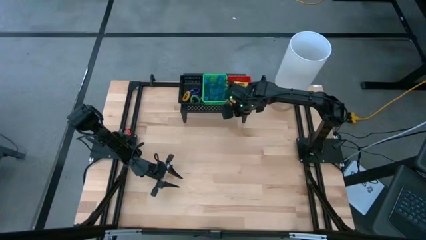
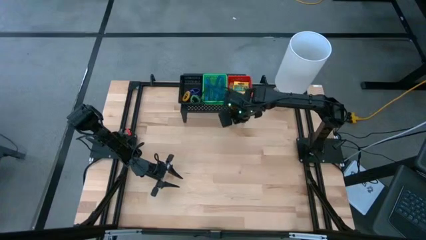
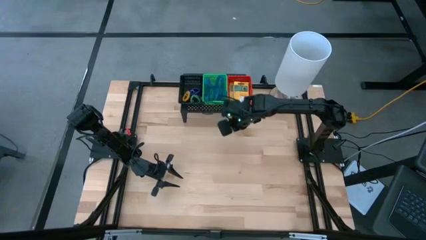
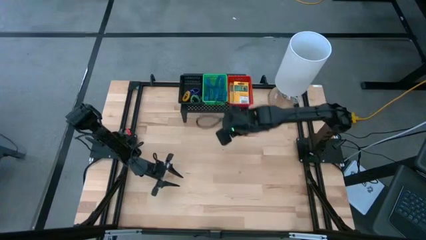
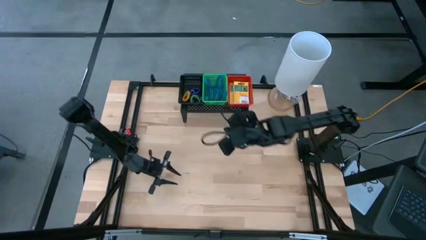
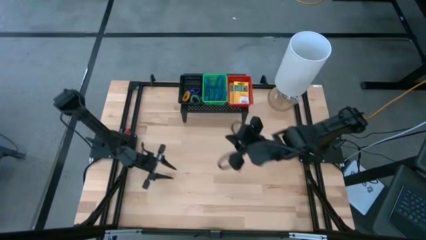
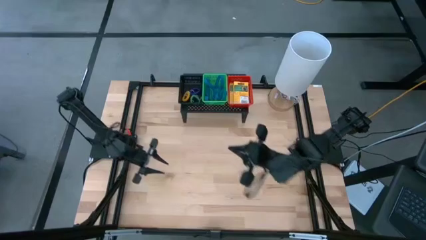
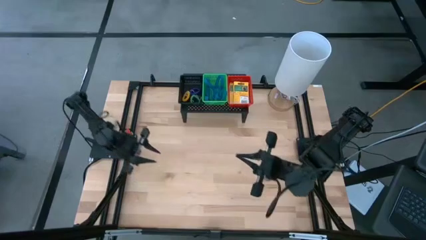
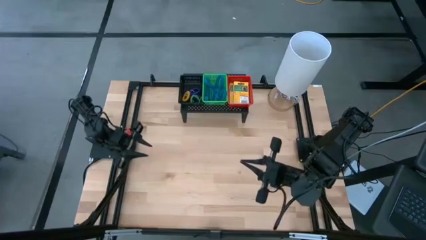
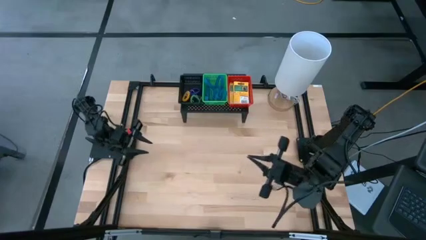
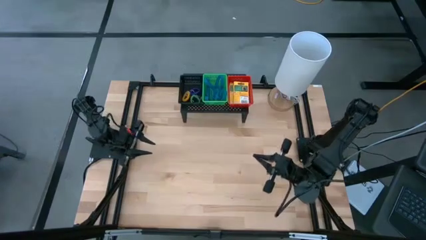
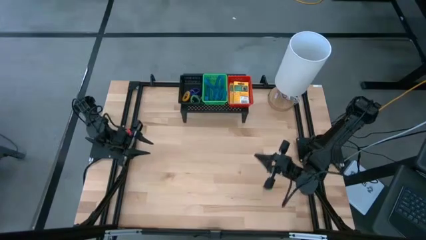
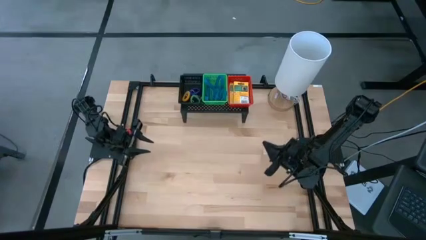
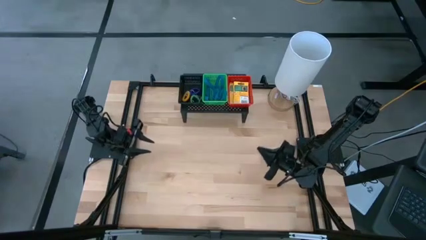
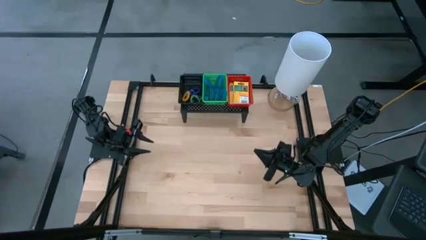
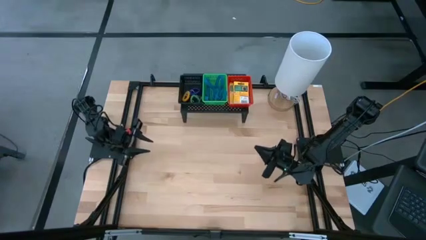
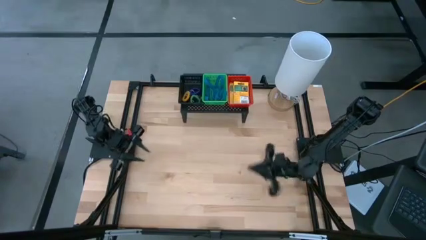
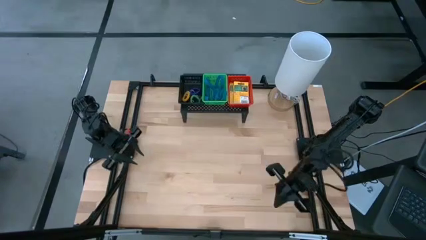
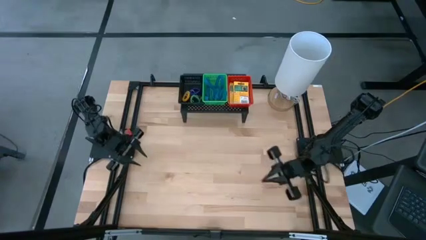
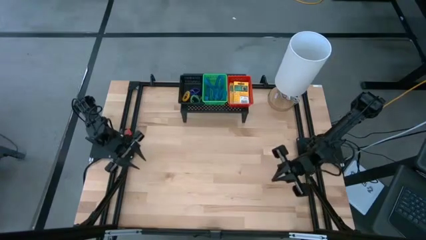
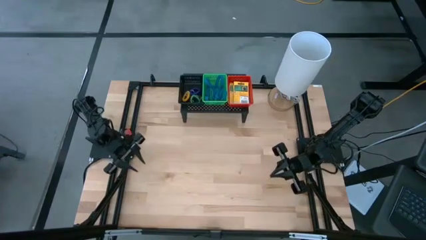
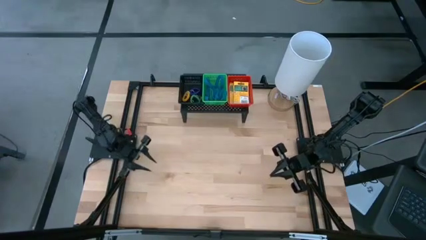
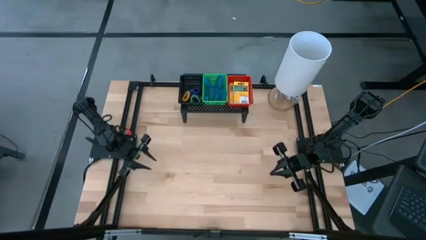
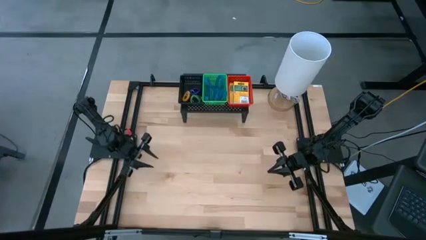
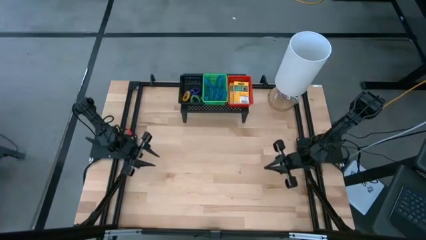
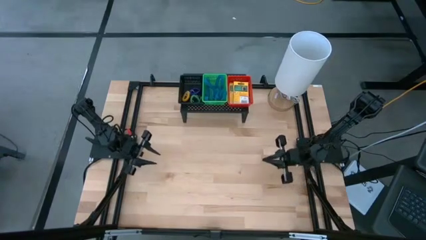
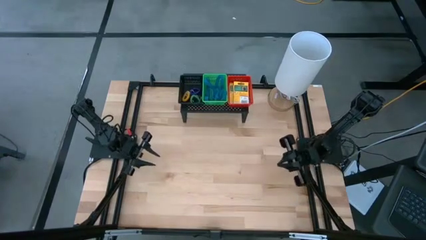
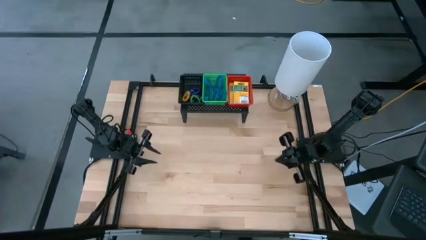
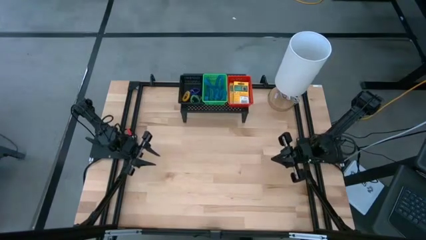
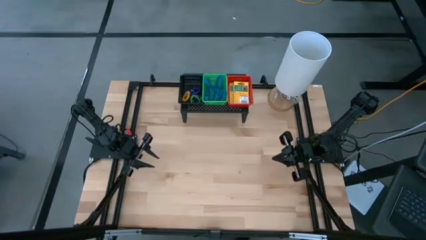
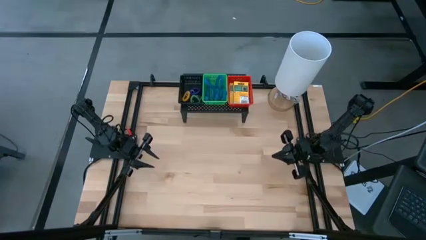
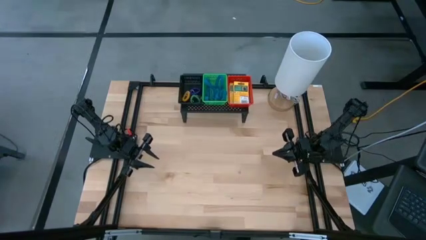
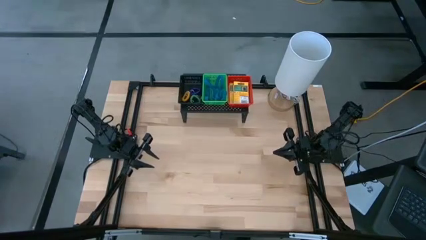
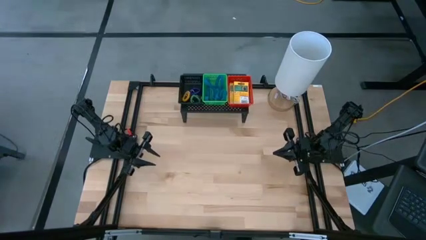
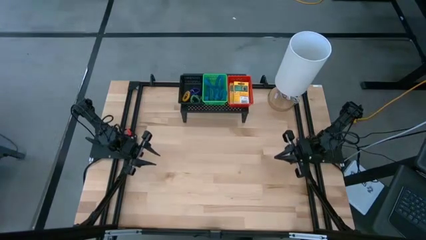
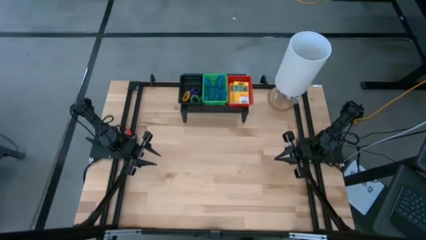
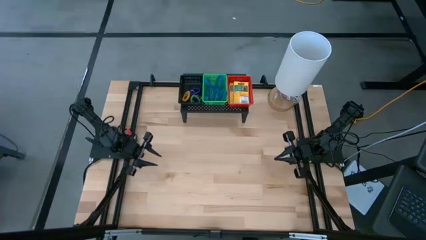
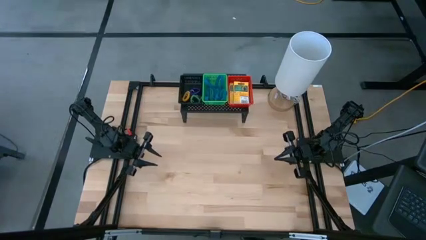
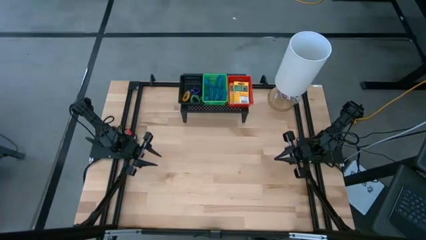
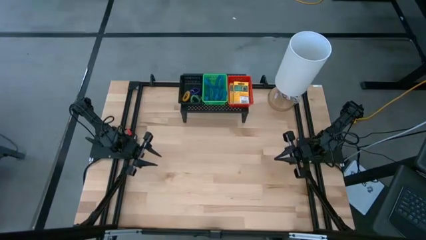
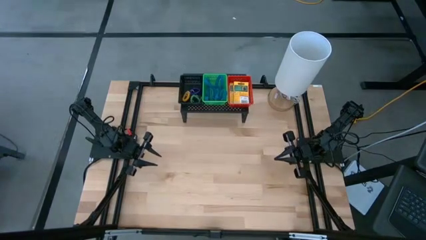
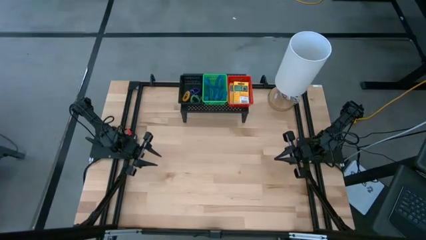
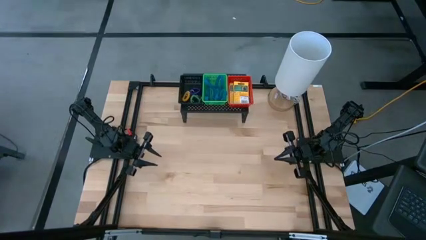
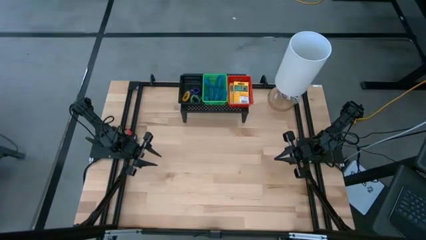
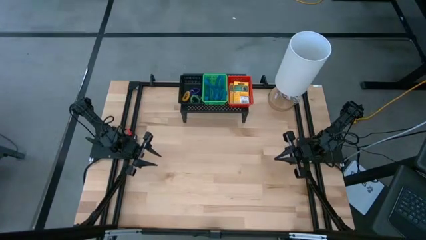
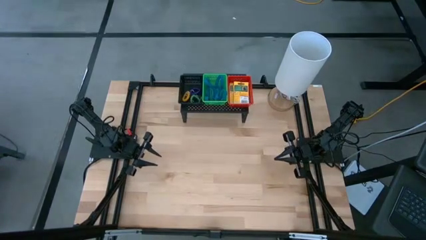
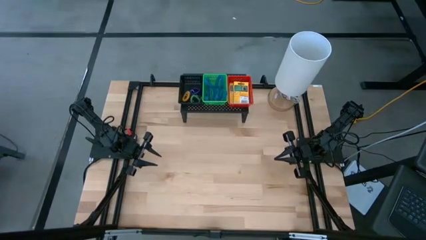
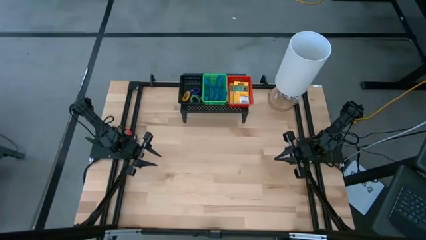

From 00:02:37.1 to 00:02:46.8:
Task: Pick & Place Office Desk Supplies
Return to Home Position

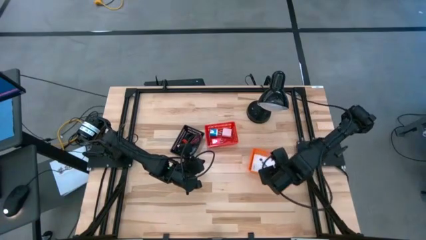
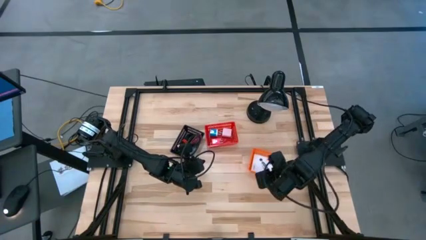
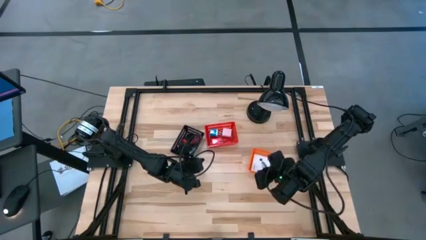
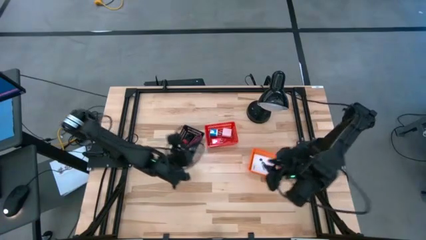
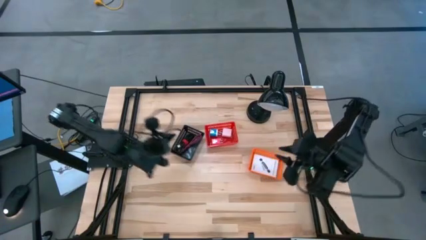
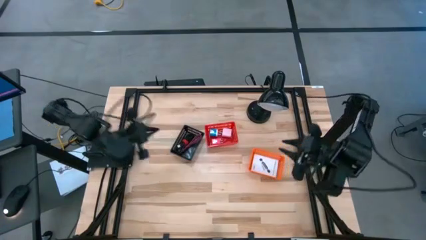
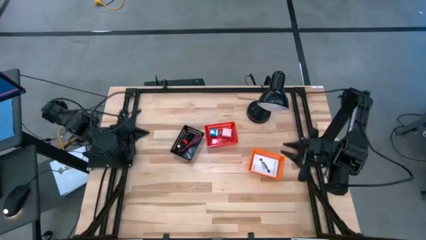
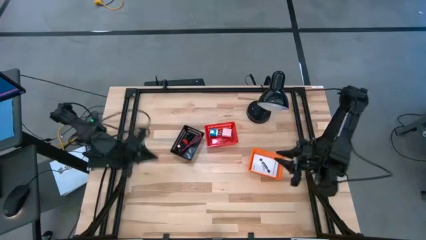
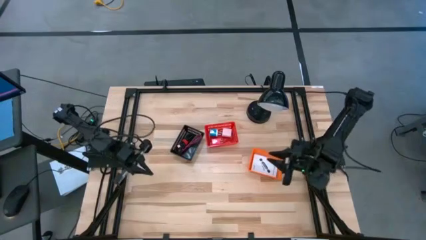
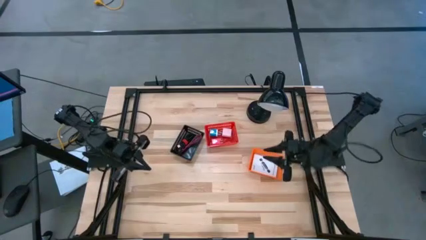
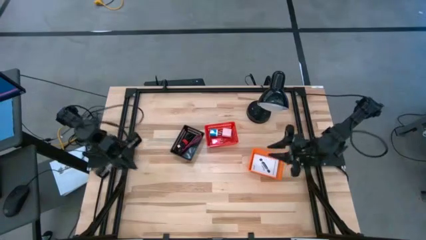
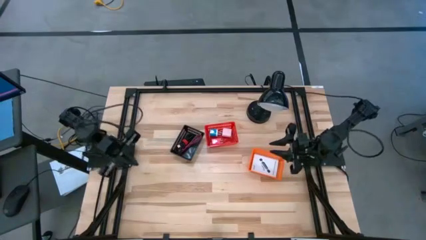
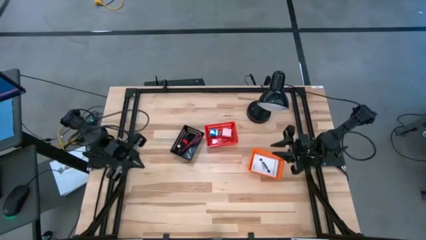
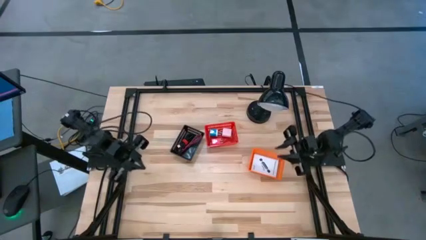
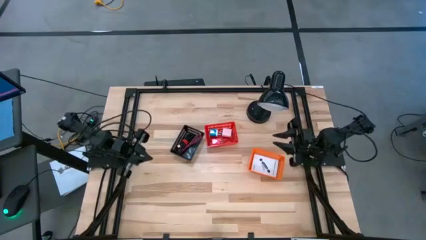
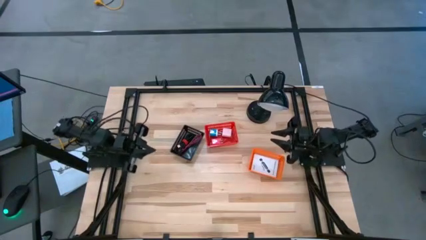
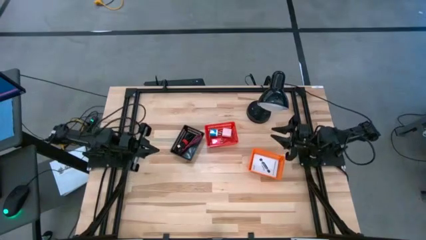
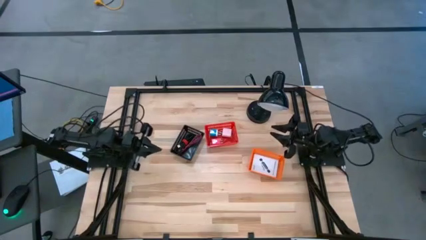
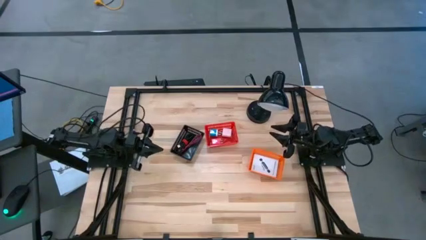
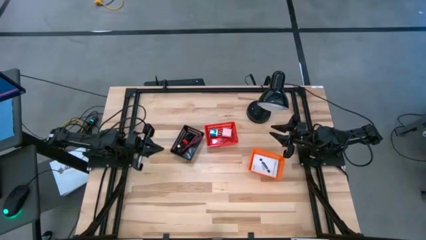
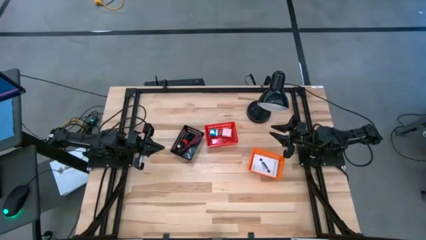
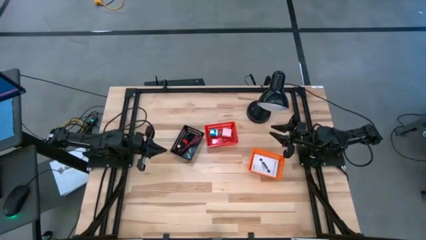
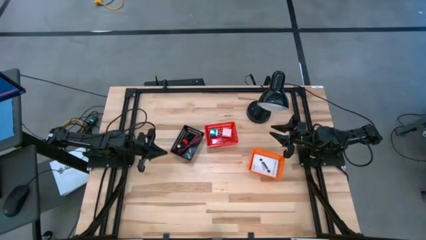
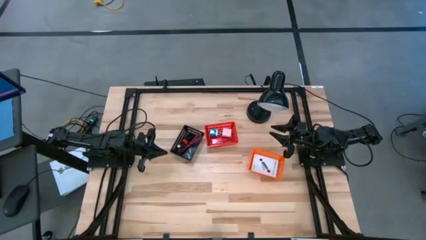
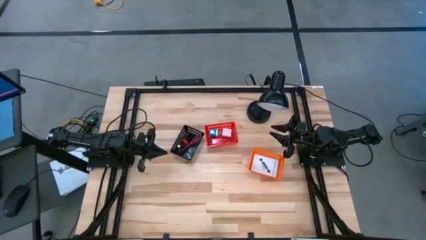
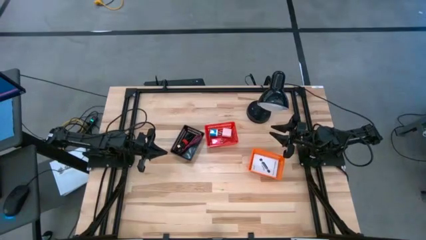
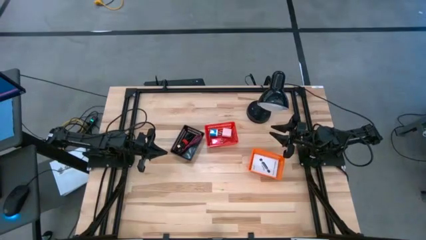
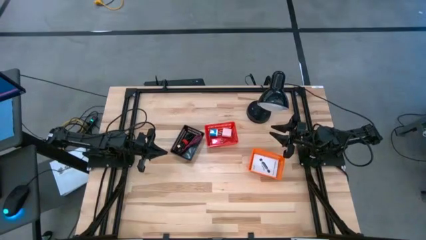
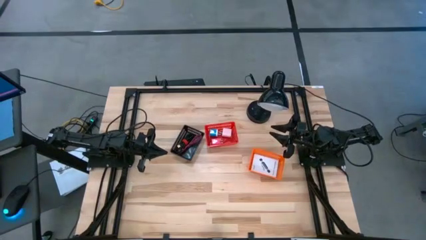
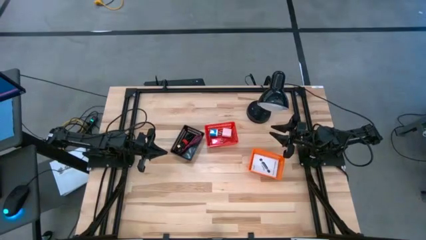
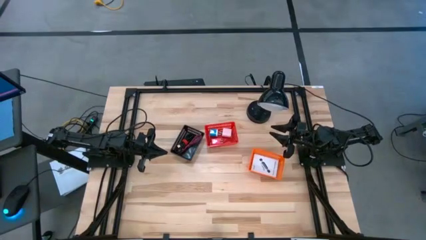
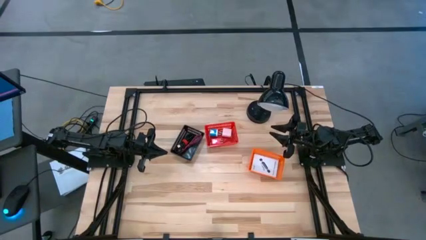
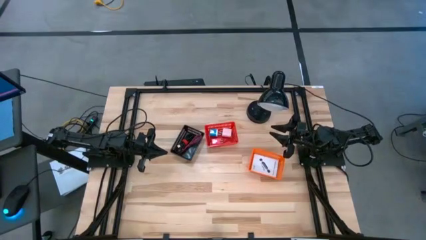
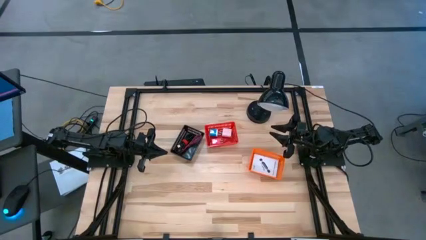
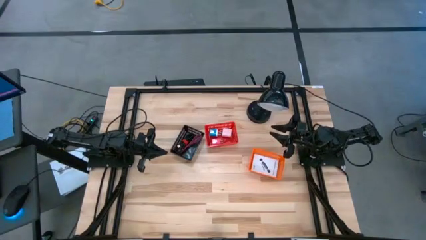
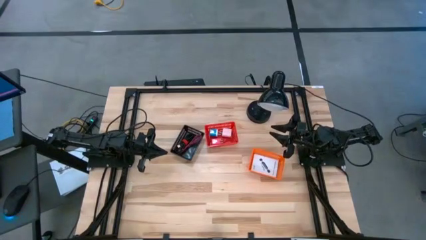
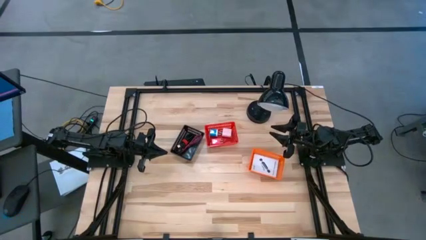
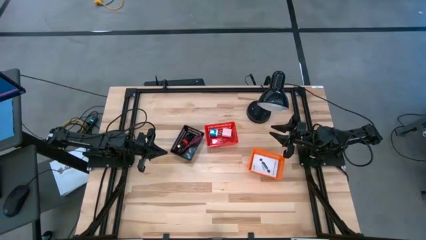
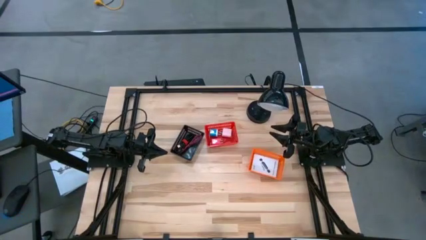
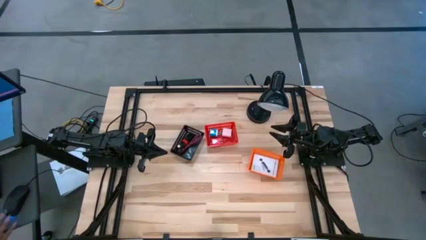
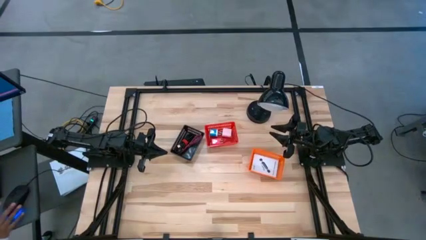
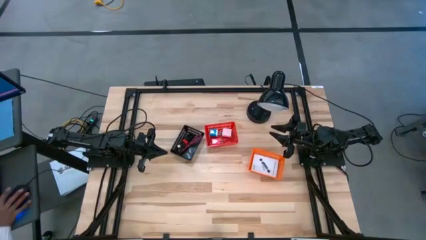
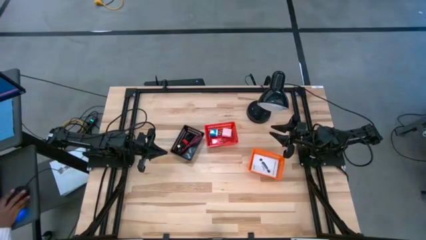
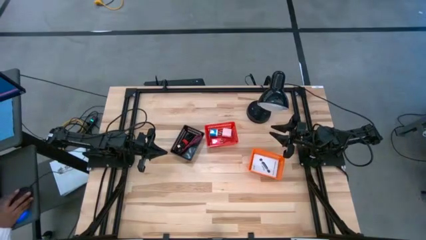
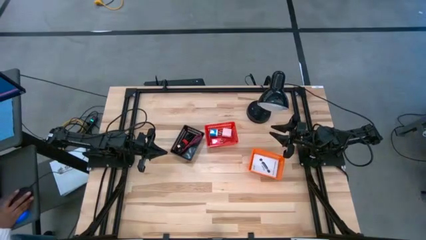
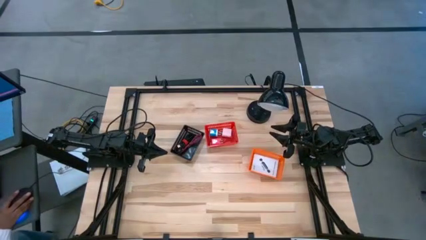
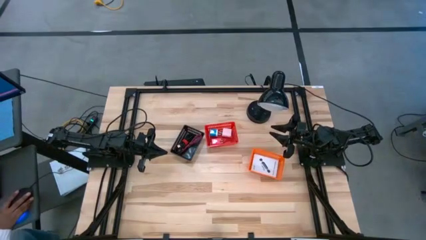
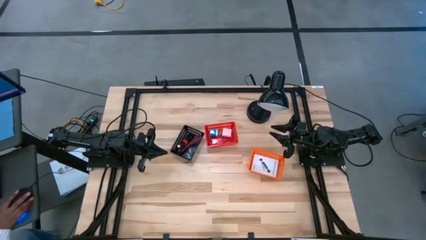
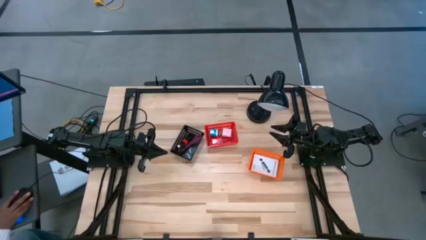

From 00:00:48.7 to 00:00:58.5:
Task: Pick and place items into bin
Return to Home Position
